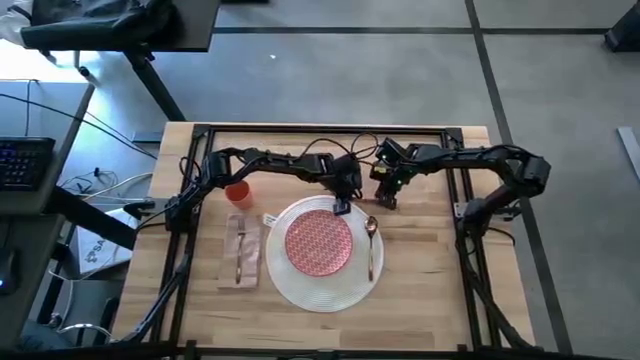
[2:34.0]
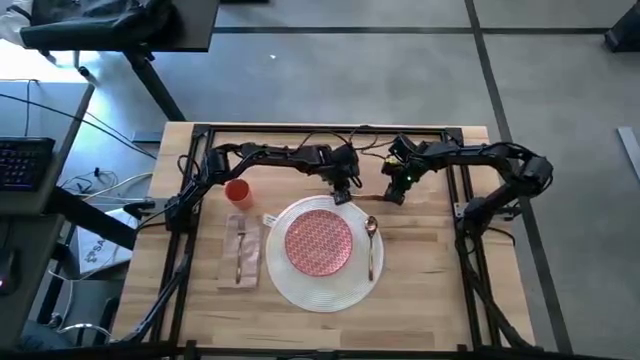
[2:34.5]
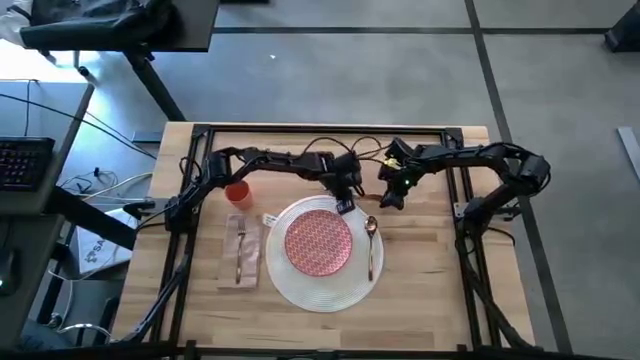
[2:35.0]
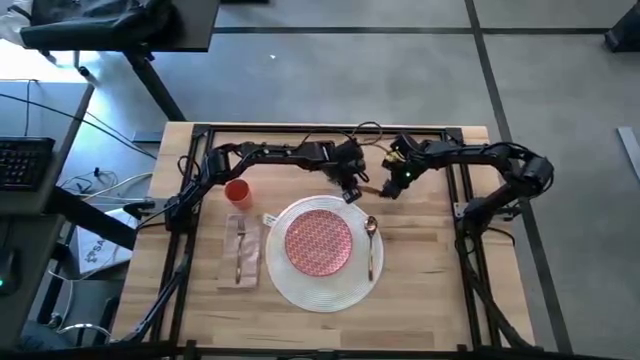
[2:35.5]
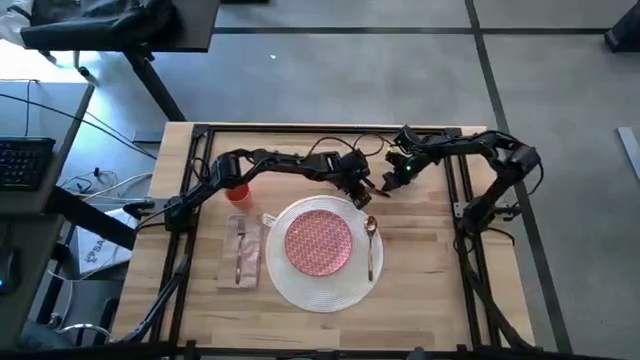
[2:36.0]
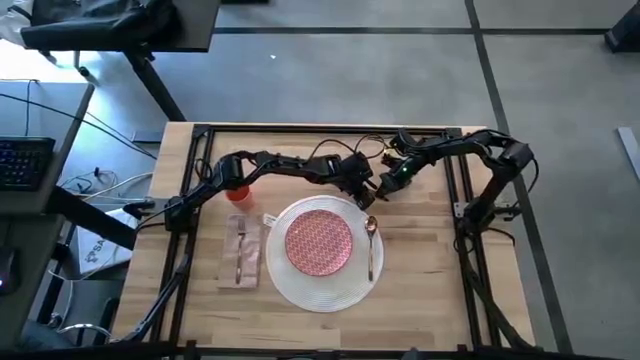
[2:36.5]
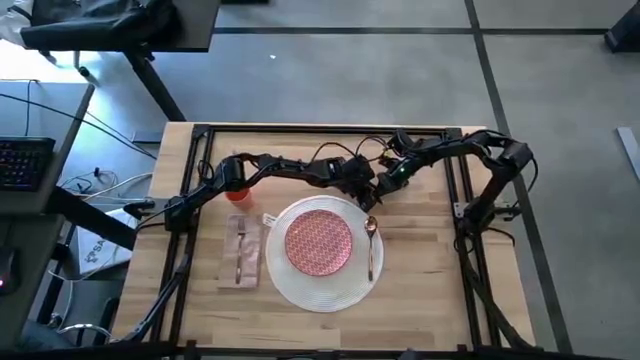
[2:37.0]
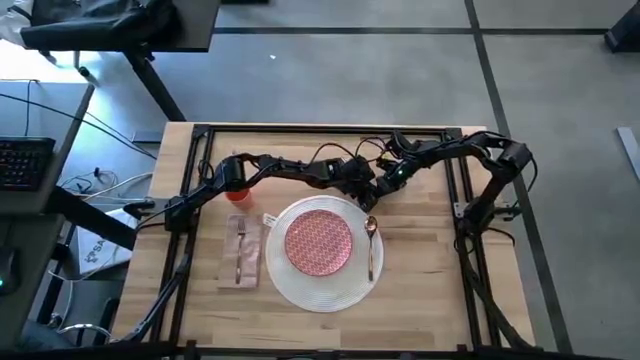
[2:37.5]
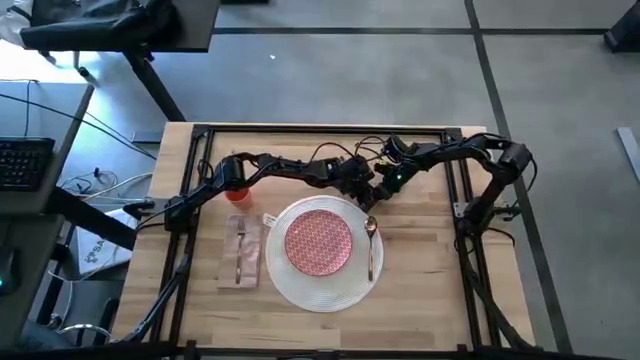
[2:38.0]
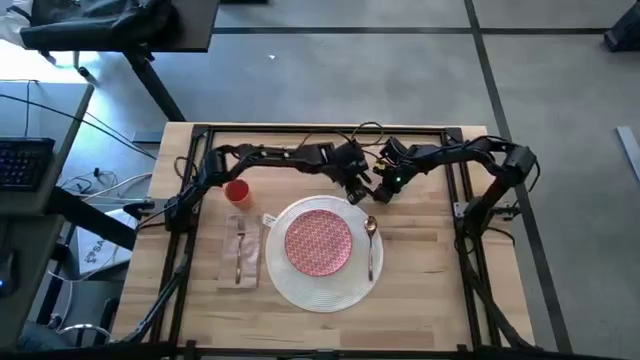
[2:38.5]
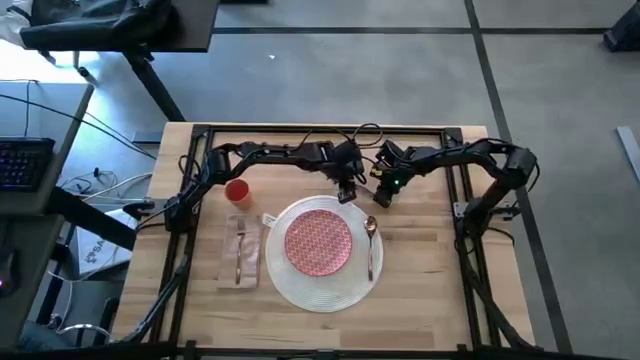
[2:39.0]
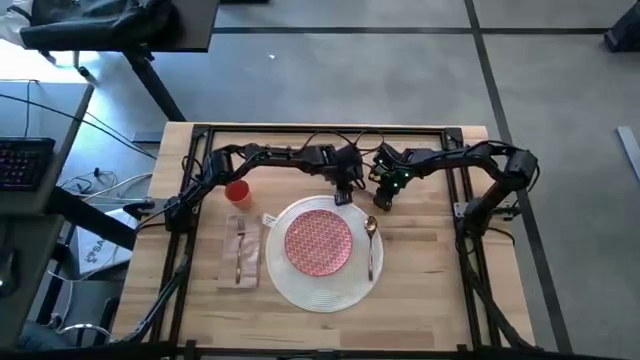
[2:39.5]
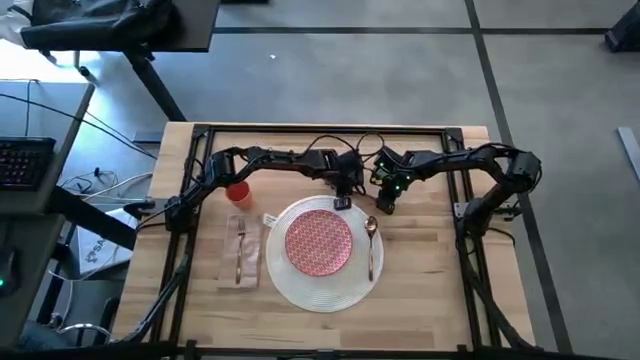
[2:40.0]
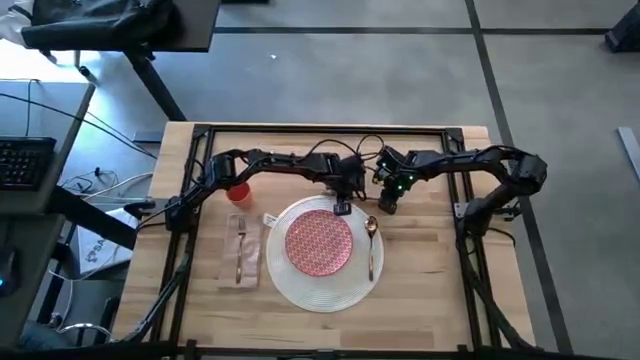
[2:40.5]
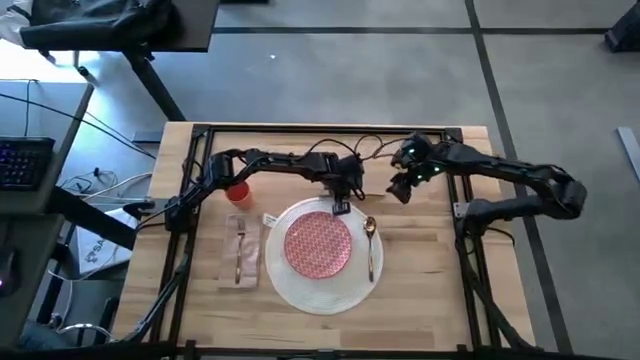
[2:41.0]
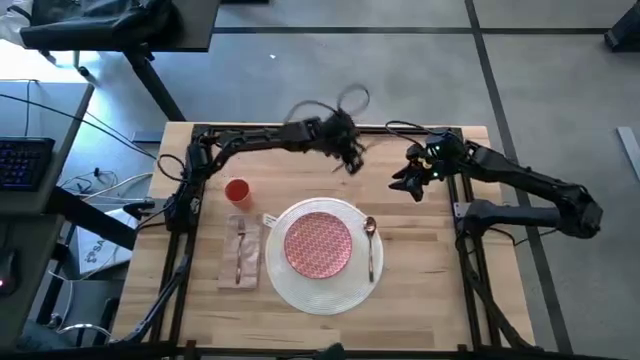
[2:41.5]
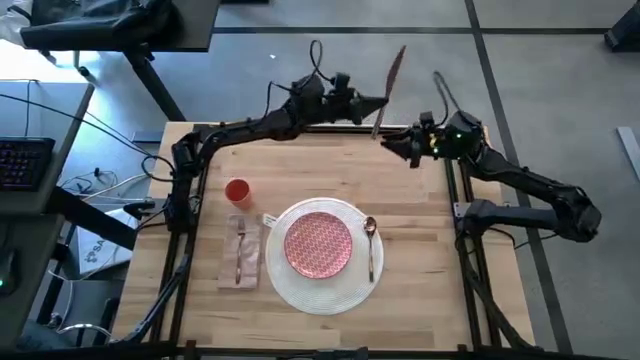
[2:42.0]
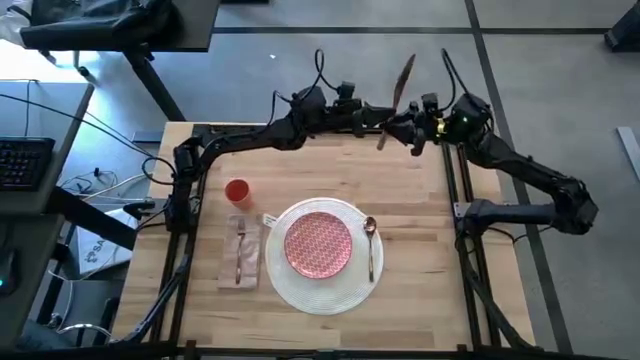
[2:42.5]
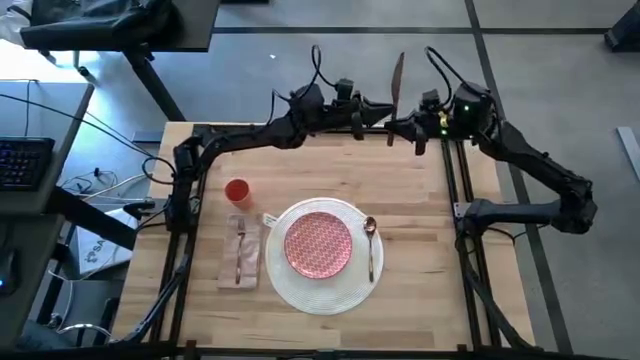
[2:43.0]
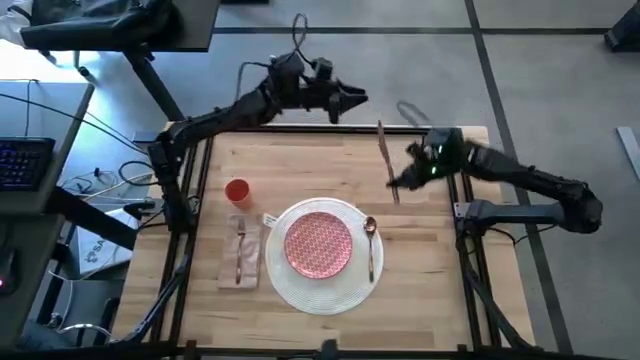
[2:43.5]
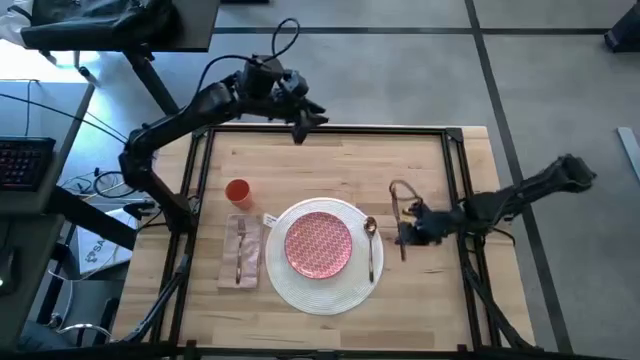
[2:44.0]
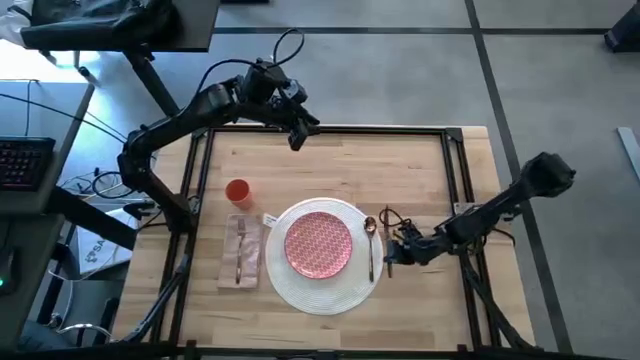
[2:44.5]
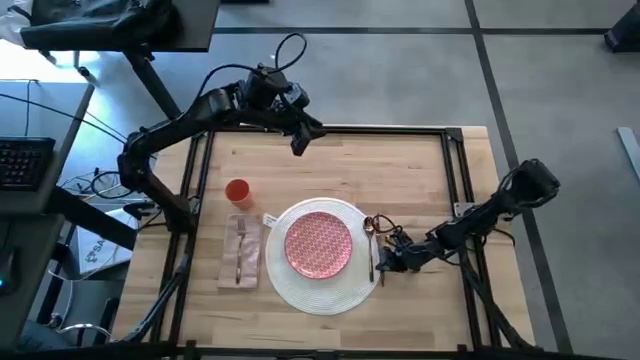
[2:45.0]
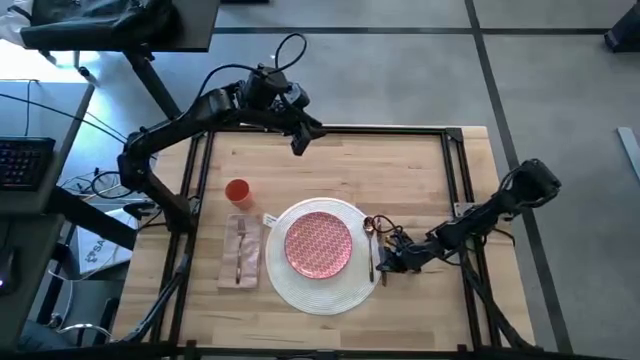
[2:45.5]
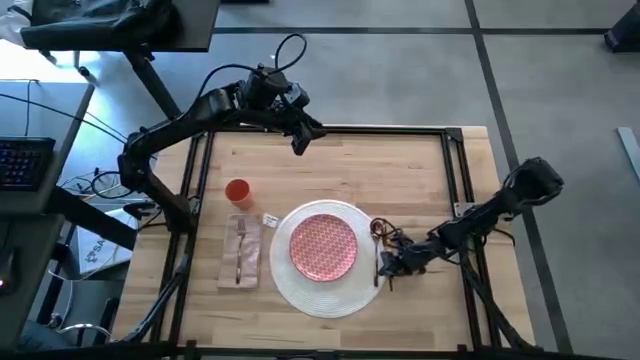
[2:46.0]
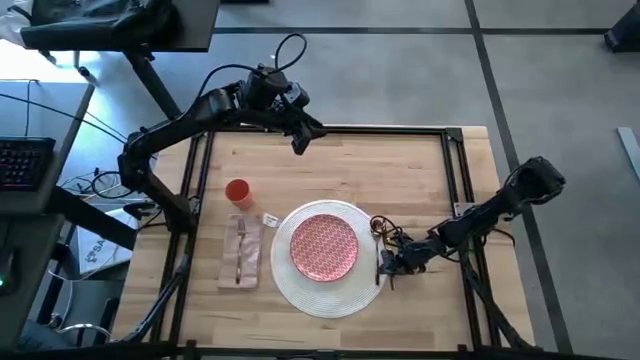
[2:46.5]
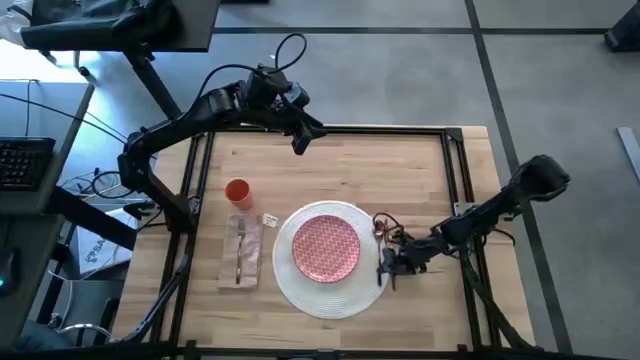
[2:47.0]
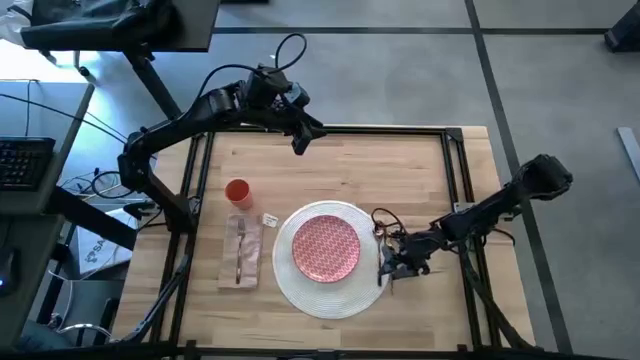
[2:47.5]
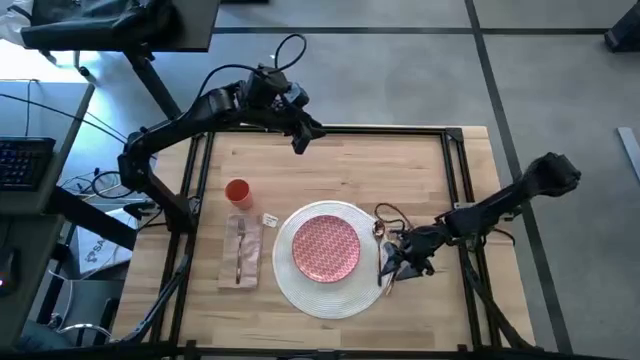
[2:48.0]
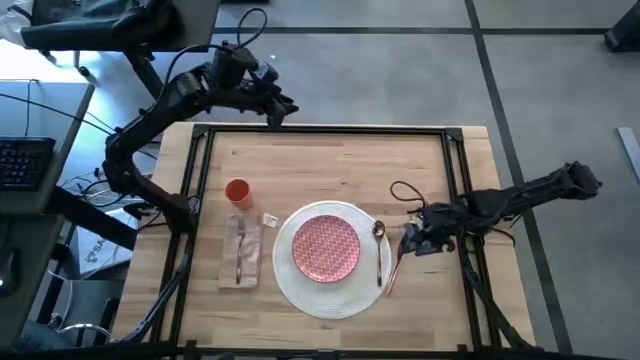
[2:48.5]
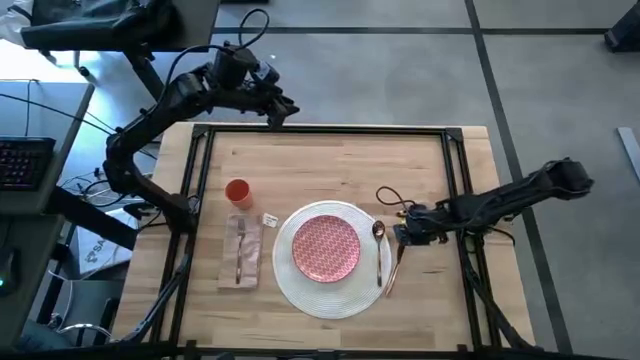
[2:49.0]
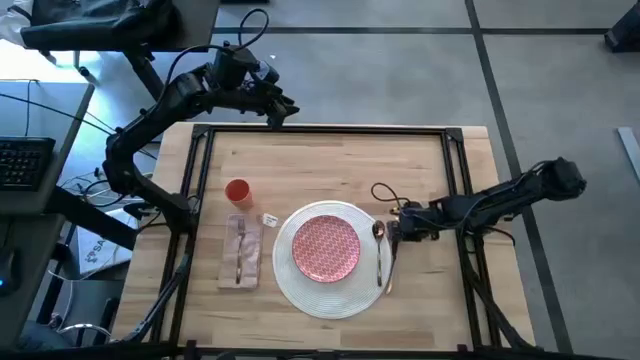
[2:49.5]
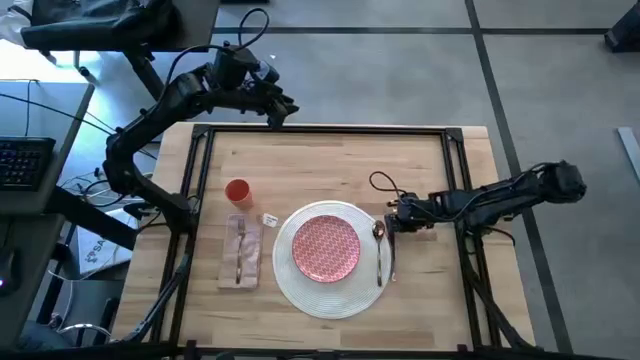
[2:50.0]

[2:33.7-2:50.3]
Task: Set table place
Put the table knife beside the gold fork

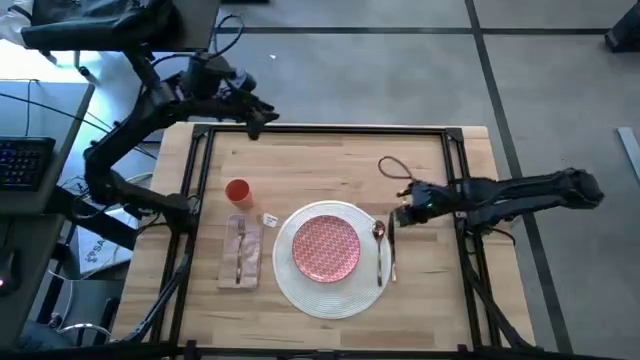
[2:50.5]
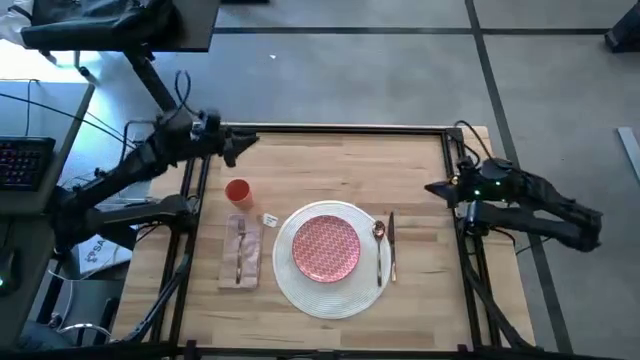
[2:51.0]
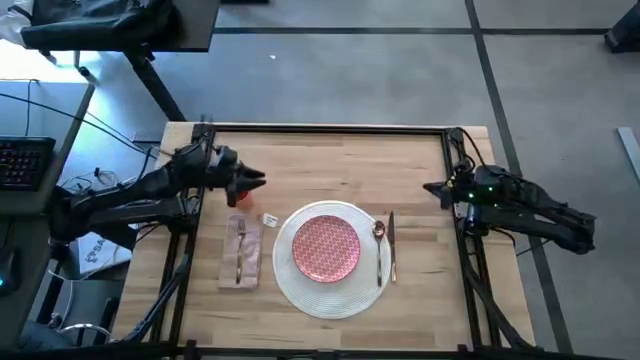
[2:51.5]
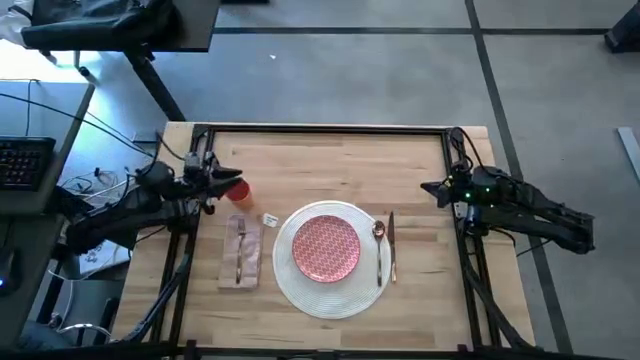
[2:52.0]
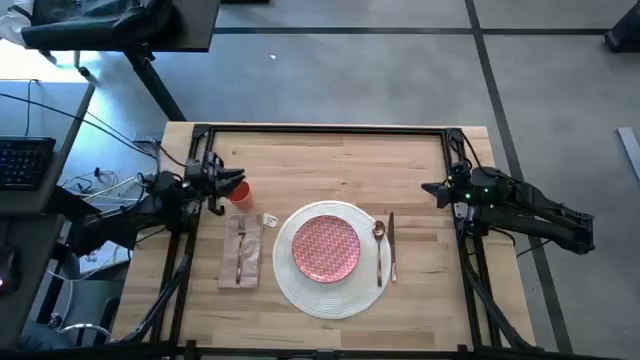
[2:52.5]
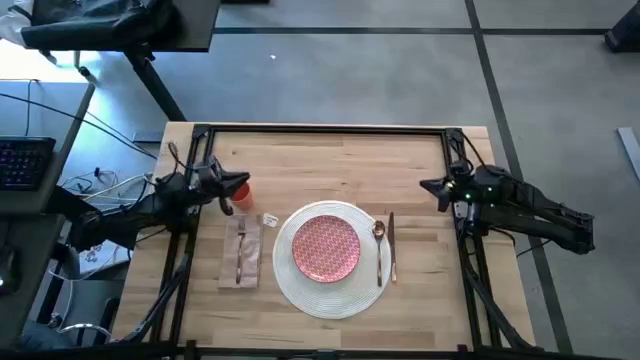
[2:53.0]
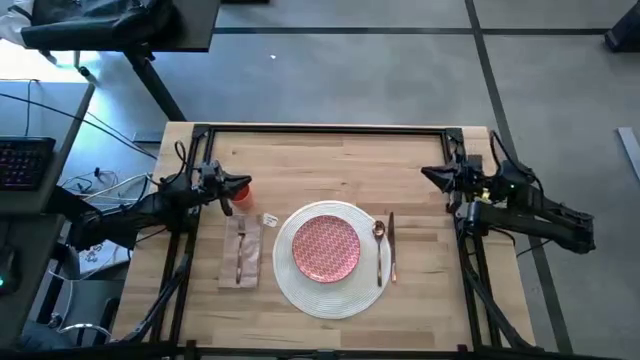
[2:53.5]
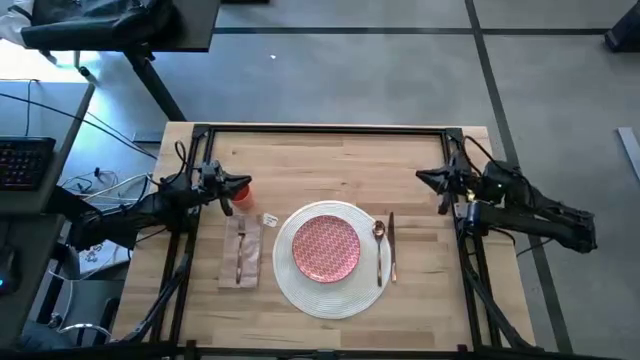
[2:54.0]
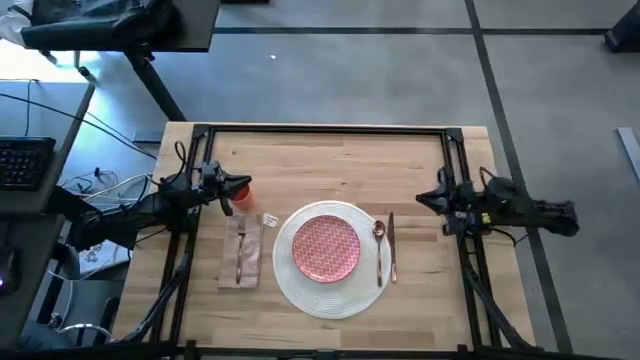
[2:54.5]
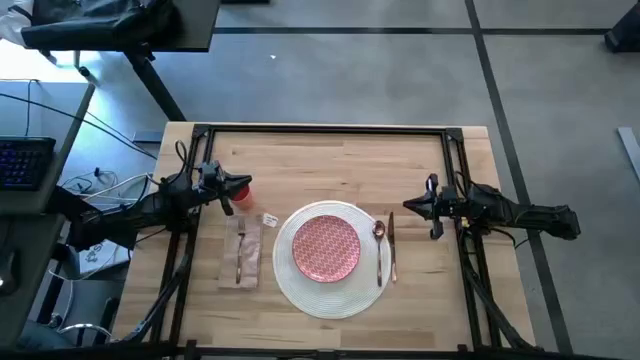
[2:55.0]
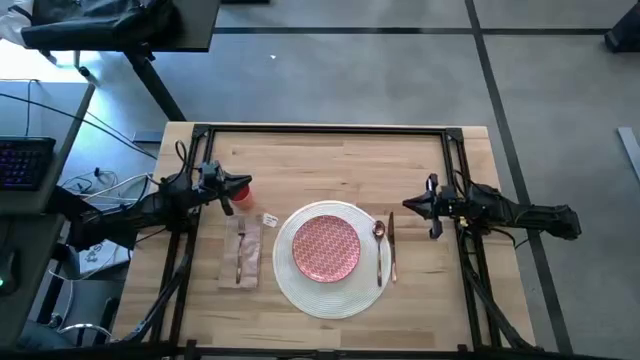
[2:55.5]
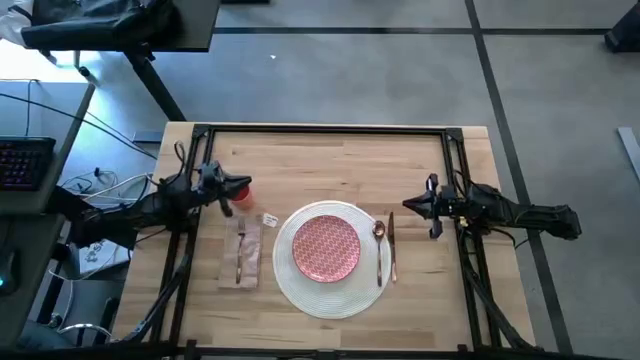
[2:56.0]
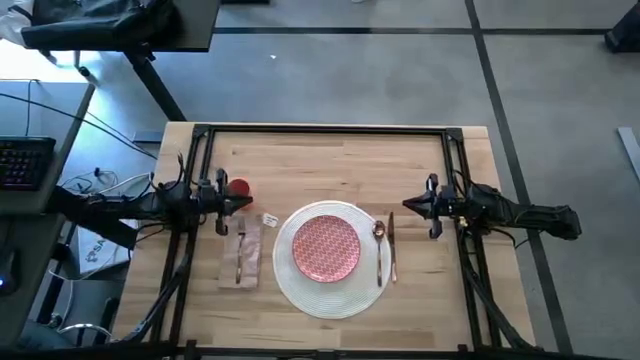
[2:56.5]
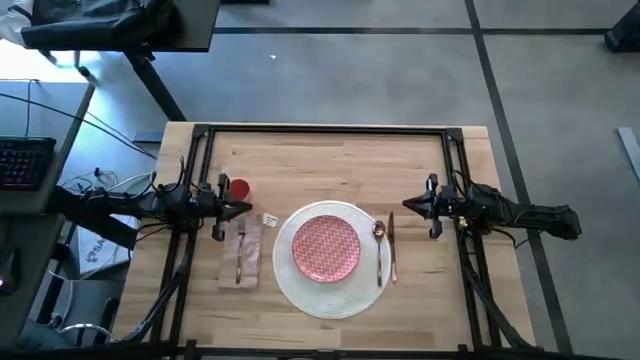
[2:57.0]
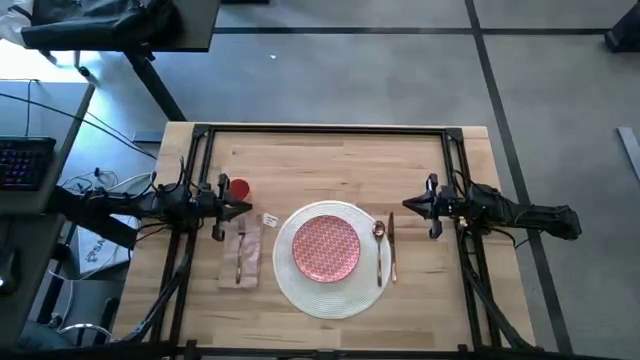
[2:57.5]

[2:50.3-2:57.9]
Return to Home Position
